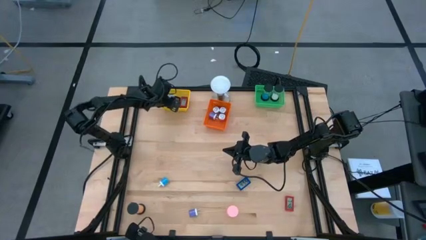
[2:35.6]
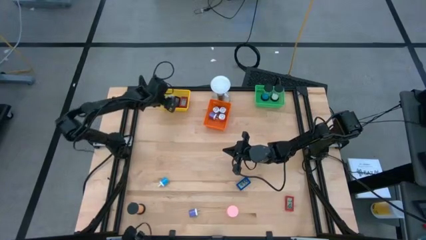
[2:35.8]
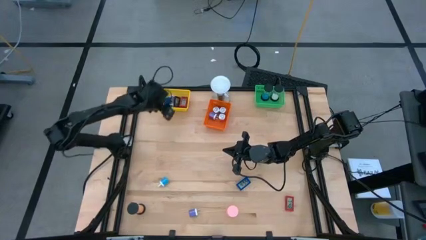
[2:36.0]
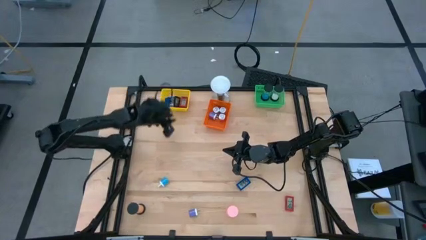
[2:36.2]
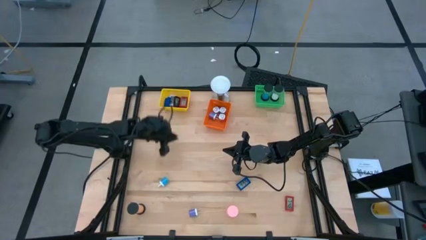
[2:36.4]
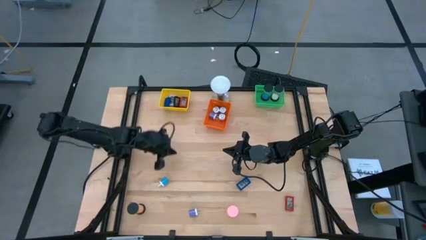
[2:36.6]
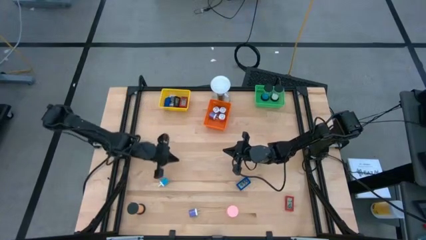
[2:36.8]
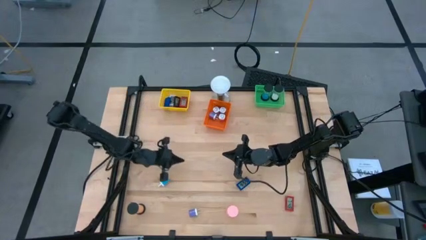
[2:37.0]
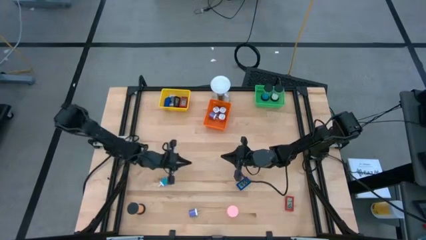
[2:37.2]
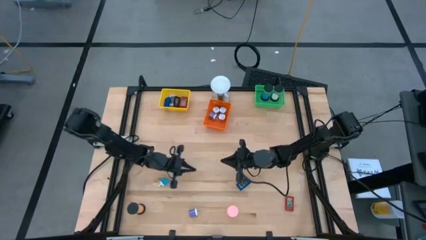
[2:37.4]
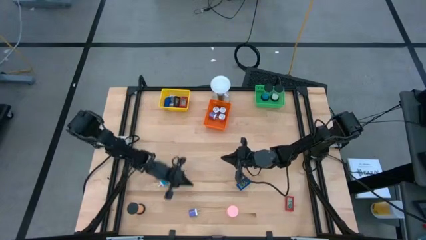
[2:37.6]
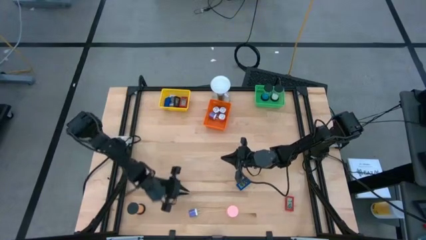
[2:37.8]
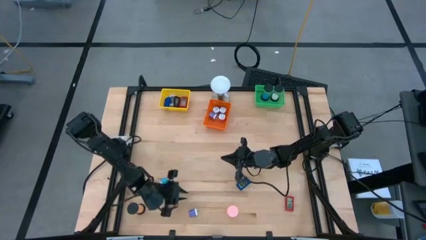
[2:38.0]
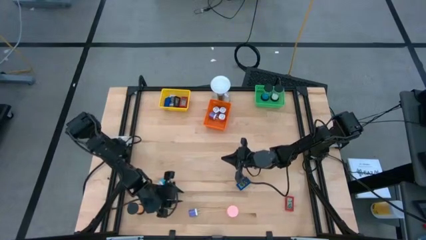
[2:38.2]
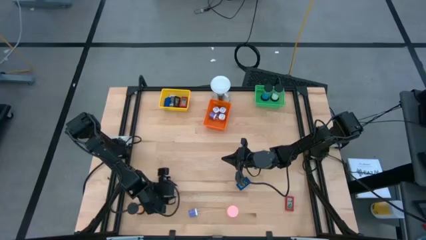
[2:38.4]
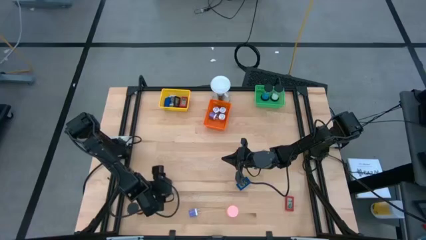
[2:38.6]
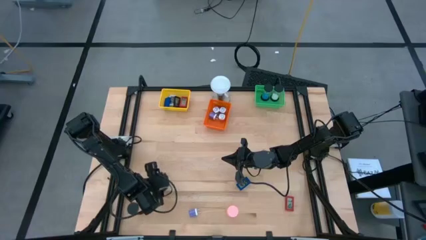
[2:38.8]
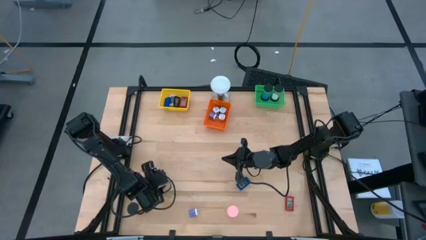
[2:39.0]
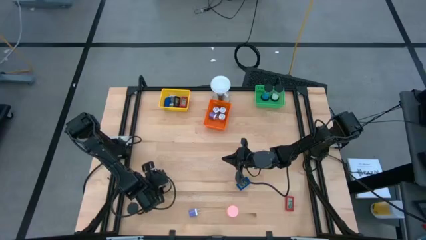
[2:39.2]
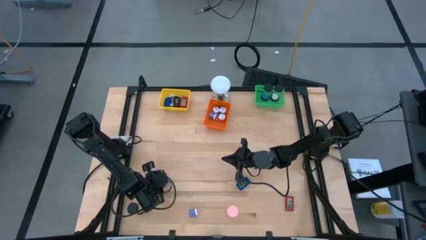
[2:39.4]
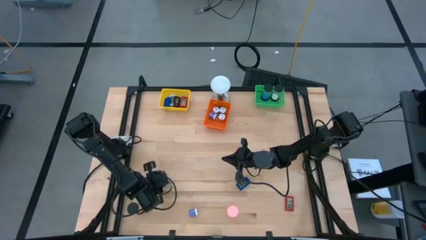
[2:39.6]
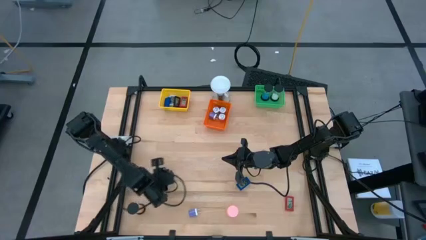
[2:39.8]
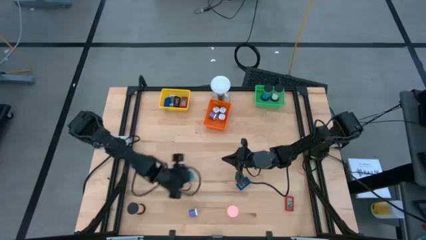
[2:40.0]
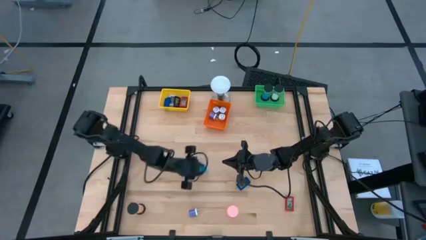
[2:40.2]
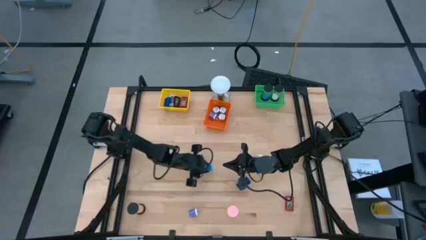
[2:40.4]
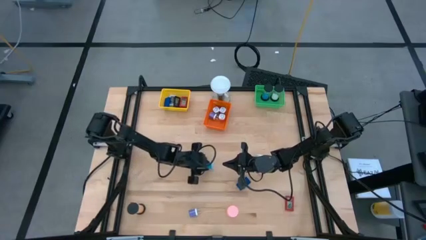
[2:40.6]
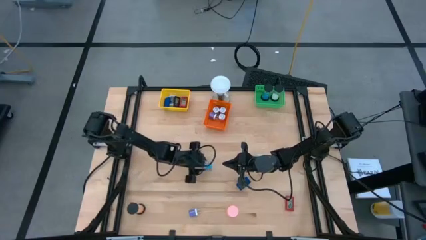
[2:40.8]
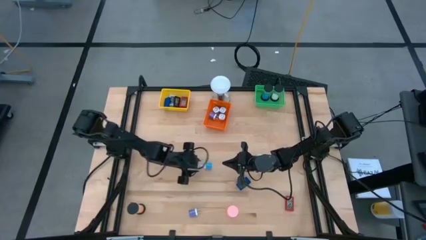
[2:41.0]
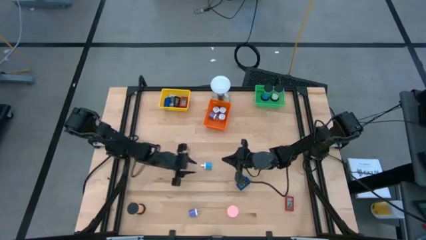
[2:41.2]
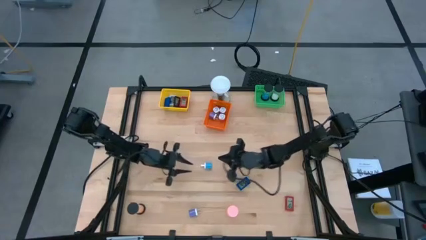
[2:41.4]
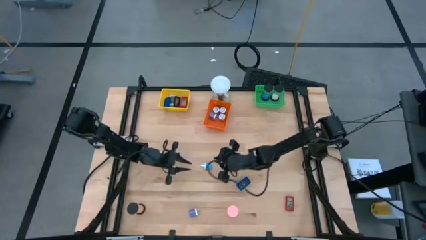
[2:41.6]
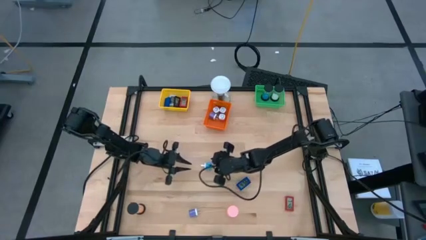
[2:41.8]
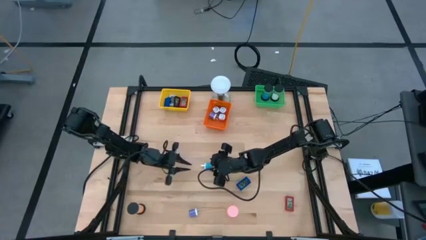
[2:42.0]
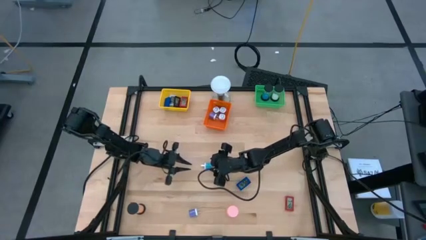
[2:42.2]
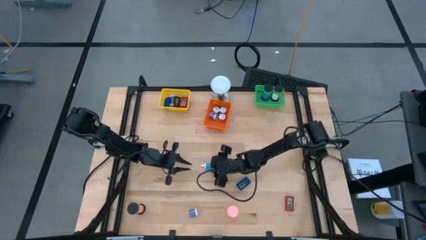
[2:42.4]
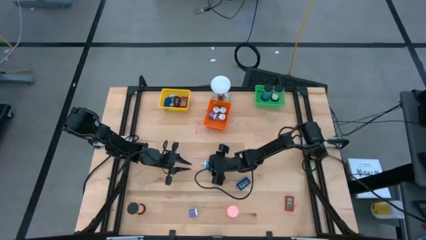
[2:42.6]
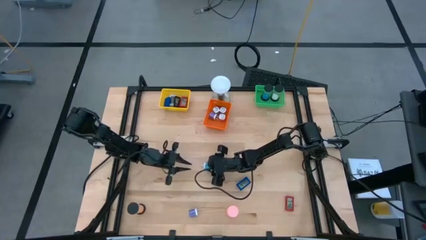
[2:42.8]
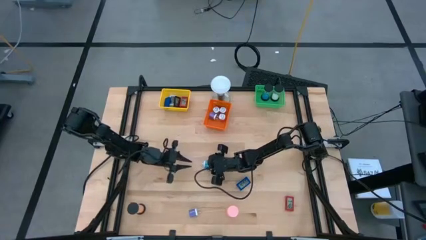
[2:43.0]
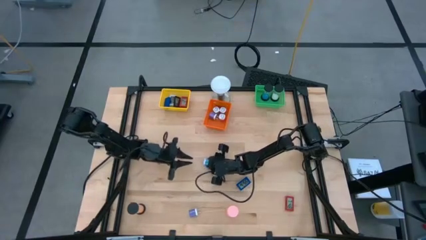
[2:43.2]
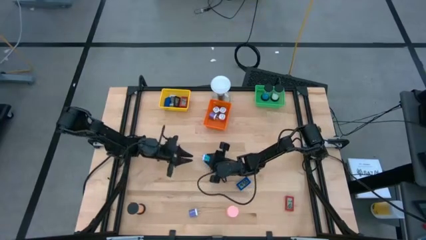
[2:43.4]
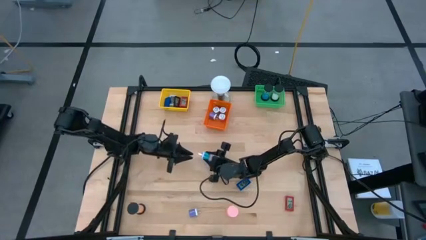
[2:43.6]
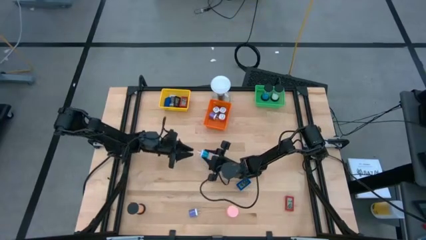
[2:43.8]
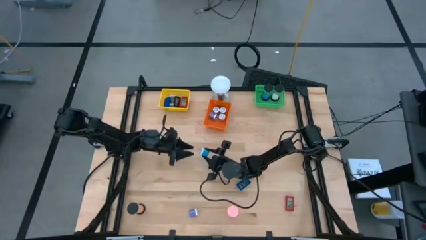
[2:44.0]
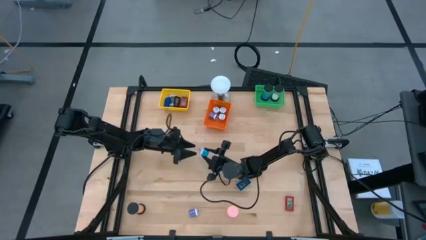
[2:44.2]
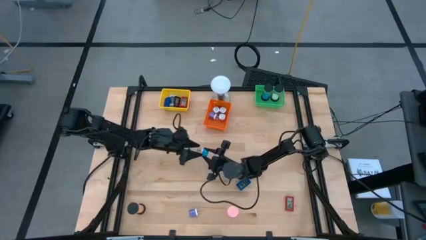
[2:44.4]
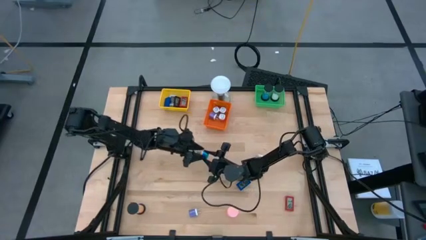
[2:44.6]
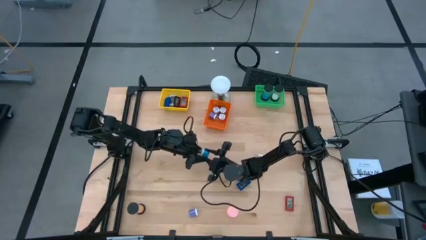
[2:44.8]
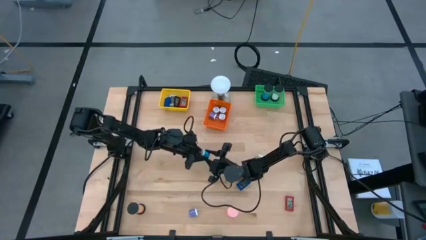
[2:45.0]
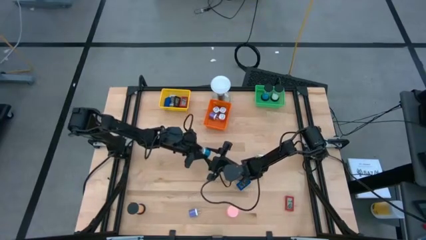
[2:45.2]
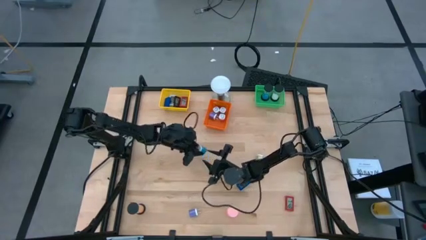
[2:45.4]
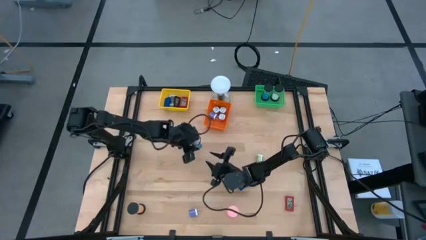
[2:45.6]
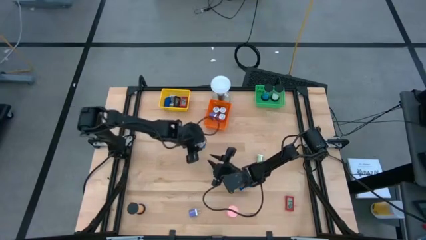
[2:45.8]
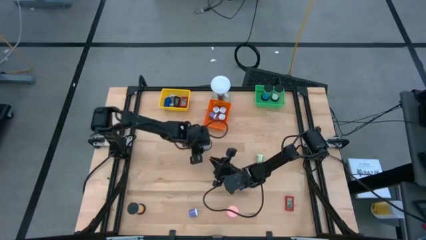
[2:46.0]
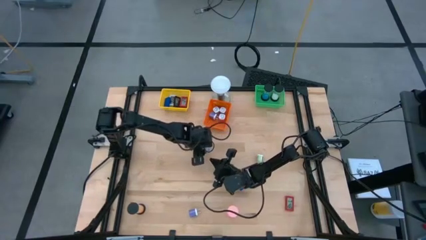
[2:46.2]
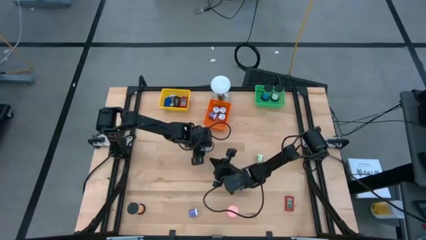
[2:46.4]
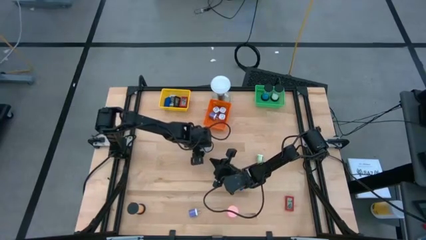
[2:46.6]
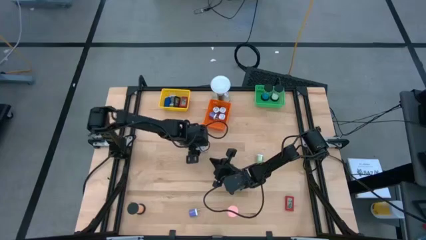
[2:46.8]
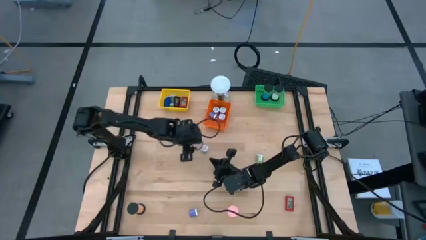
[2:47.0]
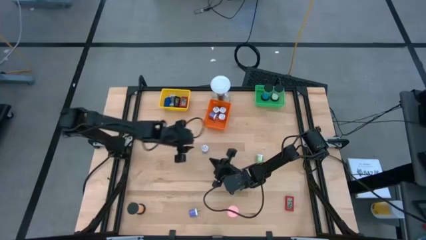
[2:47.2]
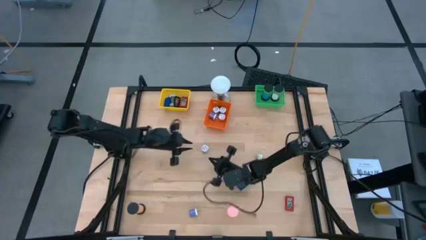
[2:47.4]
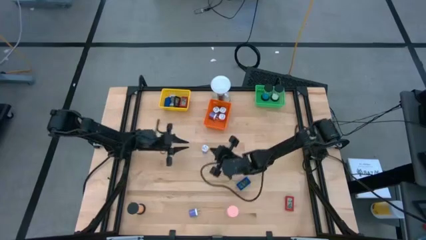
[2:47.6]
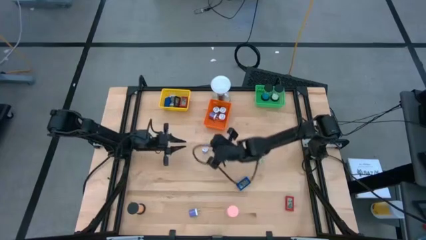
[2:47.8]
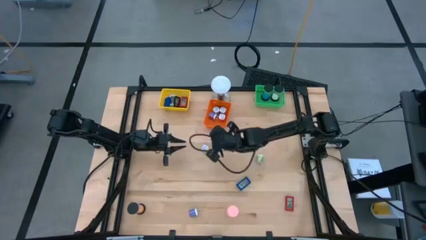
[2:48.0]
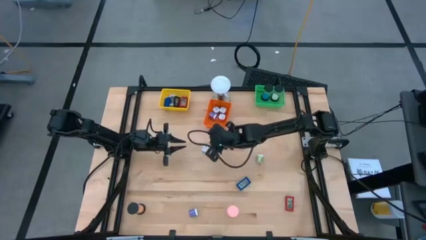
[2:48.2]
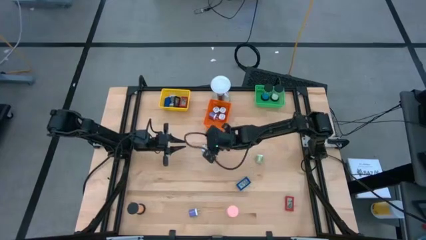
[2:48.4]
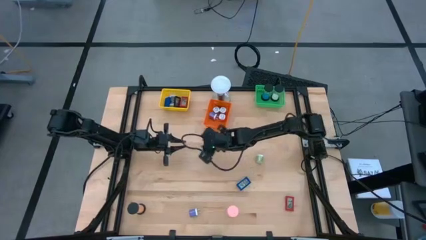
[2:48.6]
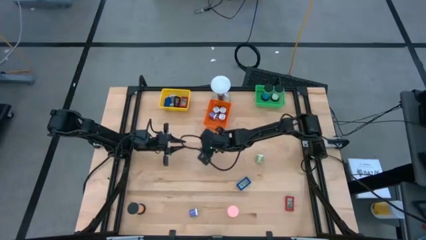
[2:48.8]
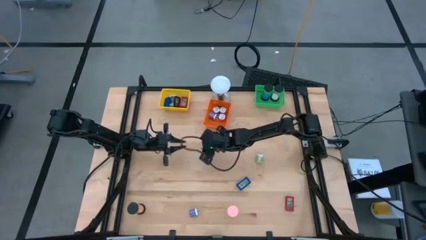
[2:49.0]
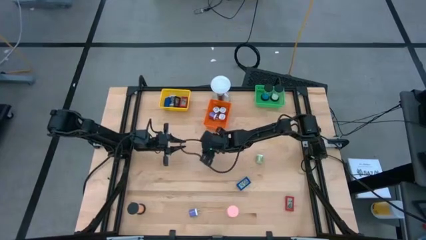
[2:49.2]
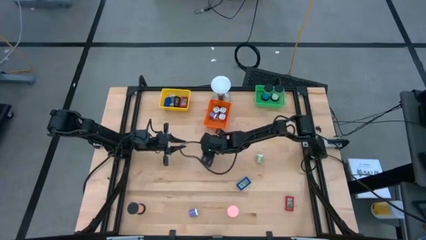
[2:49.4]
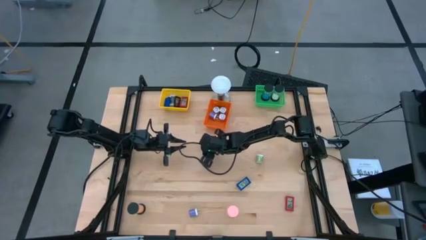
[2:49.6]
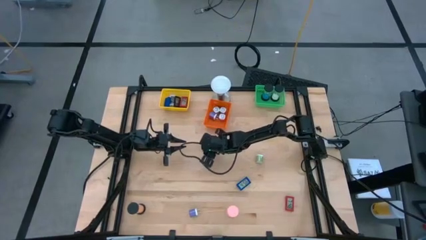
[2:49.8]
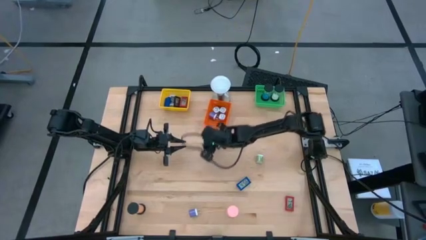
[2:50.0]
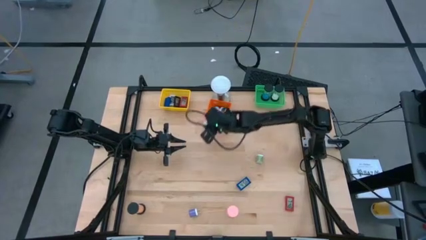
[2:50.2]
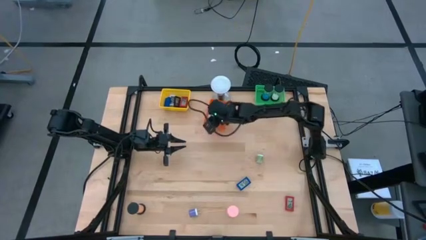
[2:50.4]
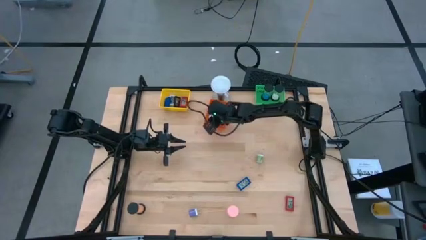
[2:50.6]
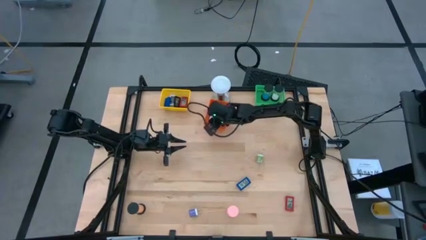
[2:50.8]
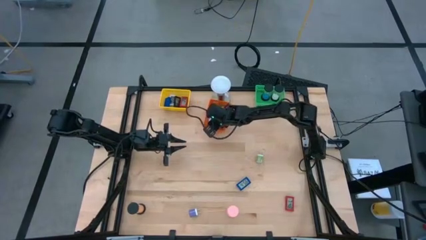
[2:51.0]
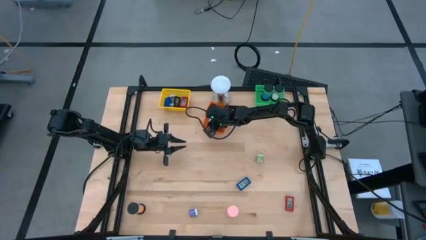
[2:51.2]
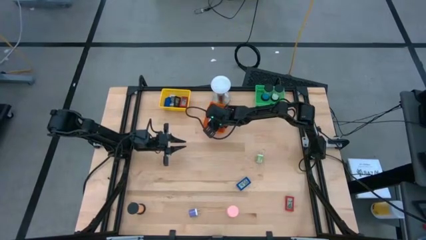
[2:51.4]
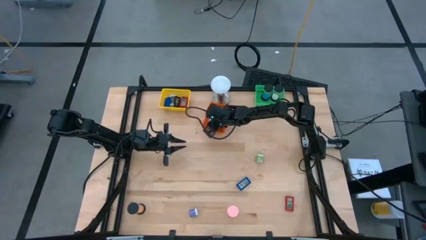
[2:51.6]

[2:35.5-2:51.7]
Task: Pick & Place Office items
Put the blue charger adapter into the orange bin
